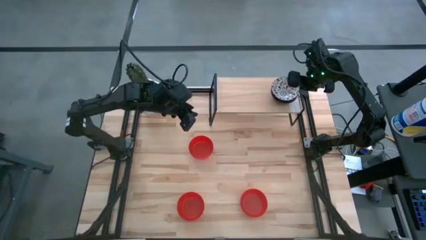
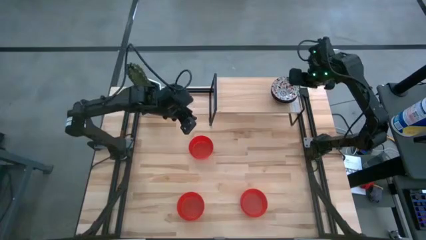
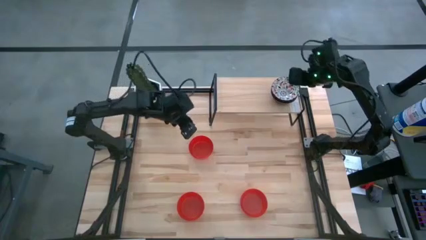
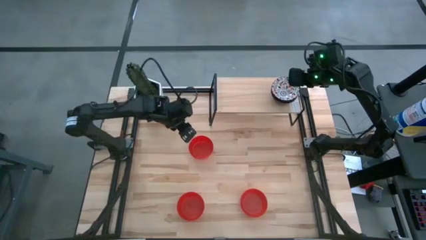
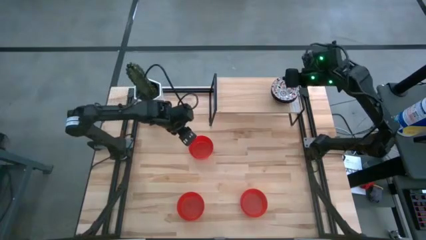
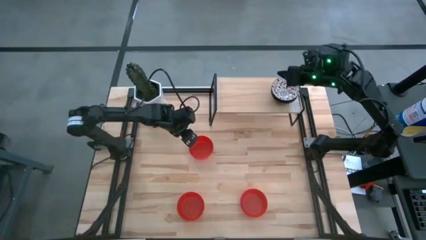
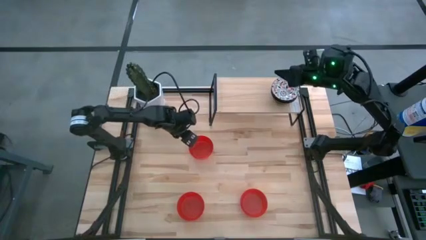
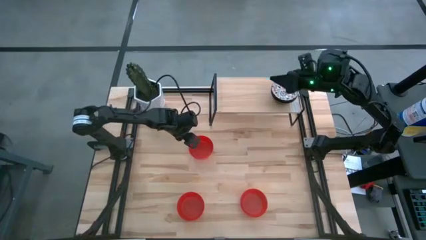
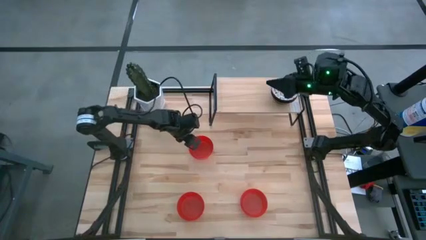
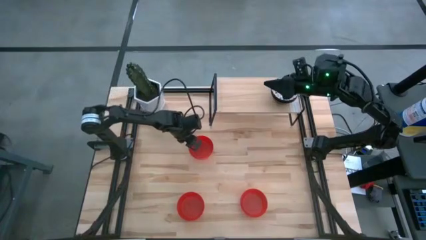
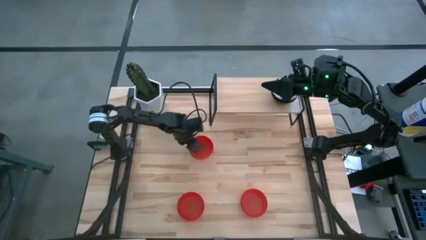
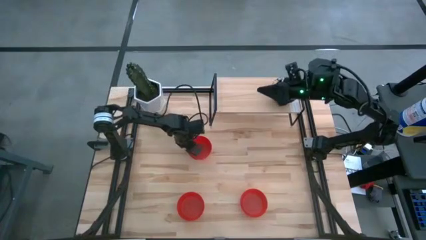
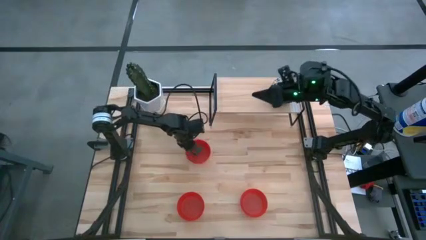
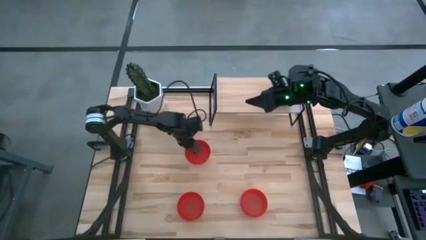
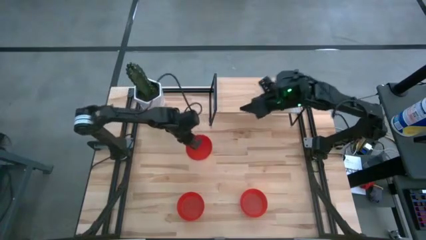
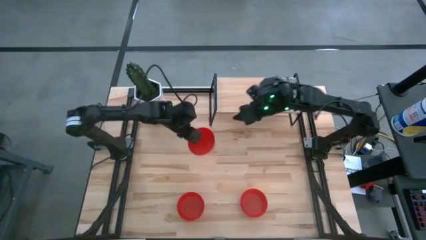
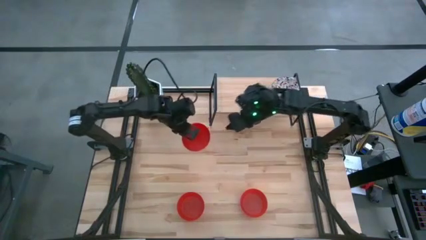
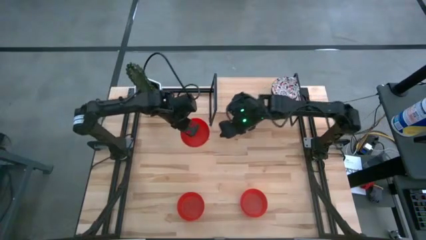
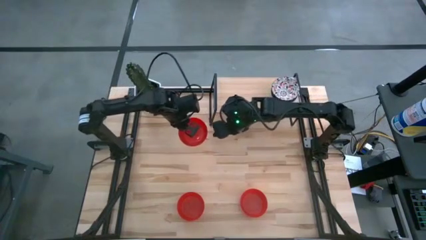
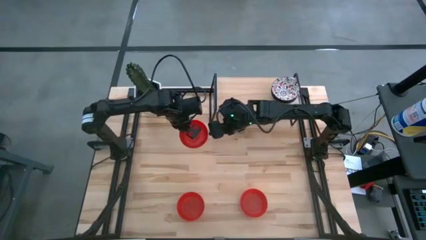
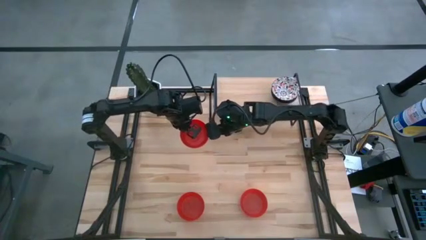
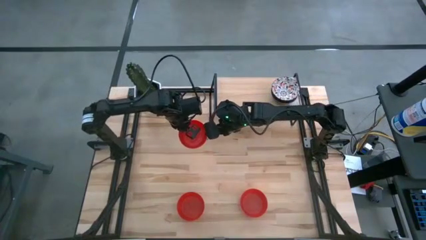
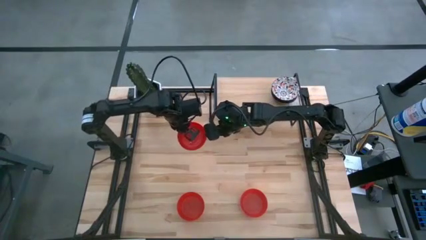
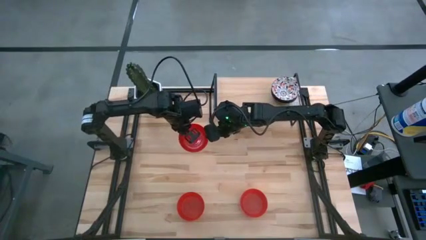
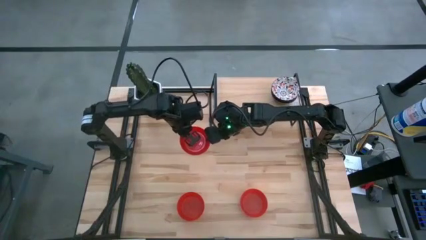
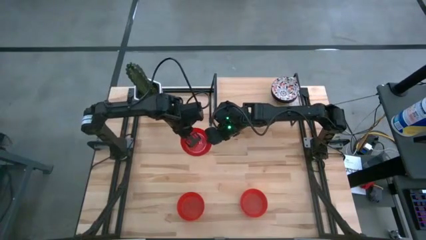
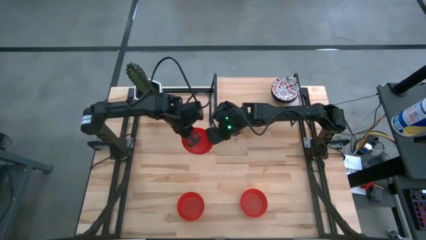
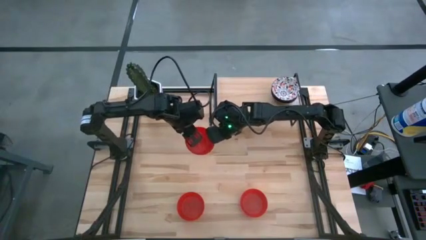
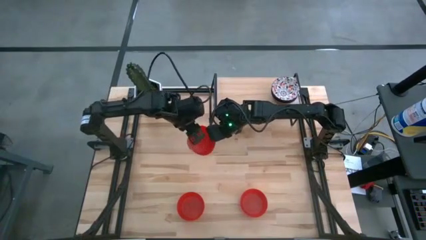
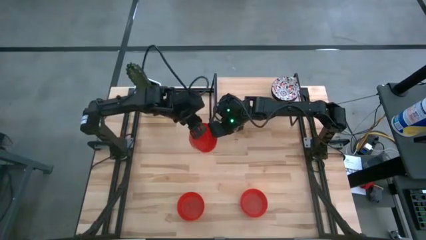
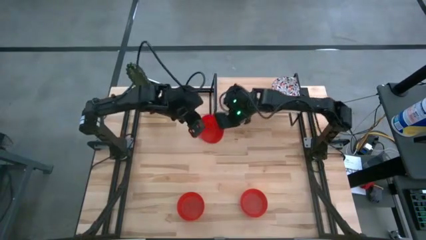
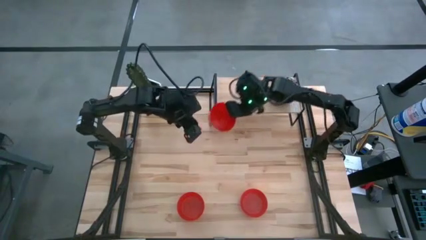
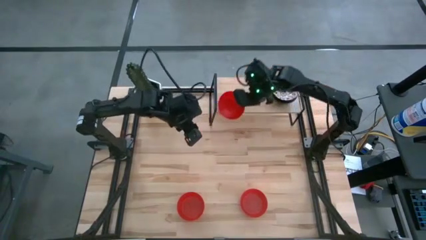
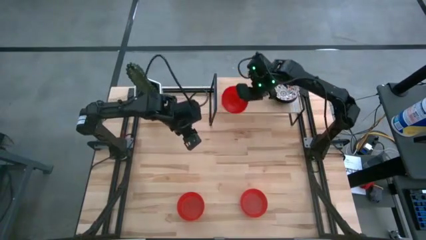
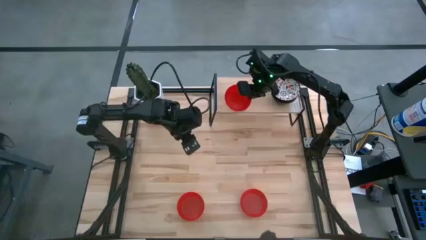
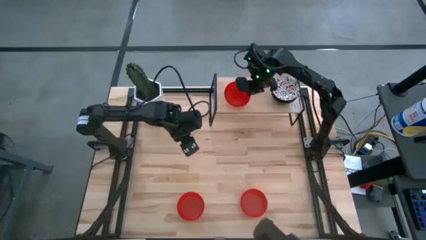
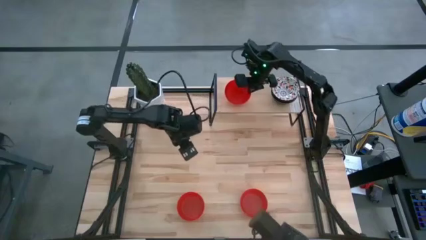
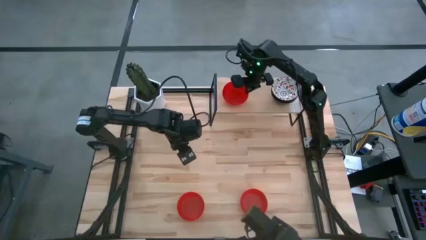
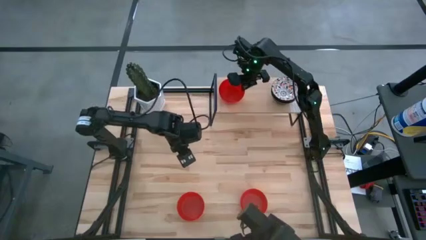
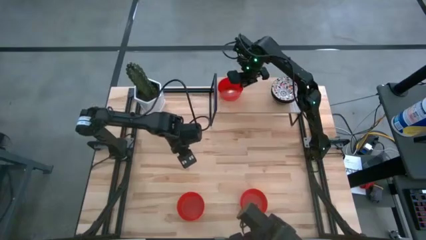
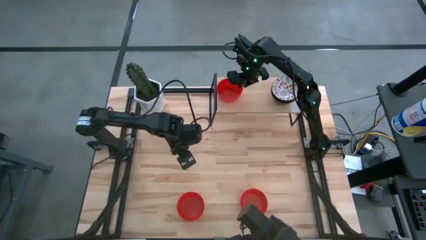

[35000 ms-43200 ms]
Task: Pick & Place Mini bowls
Put the top red bowl on the shelf

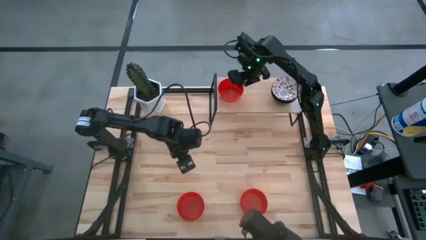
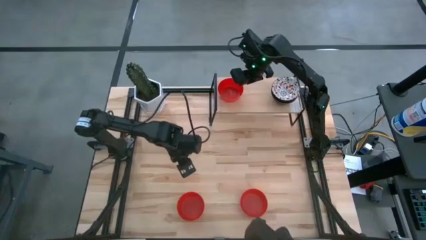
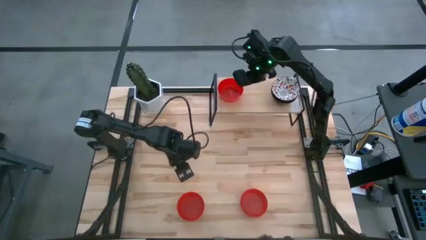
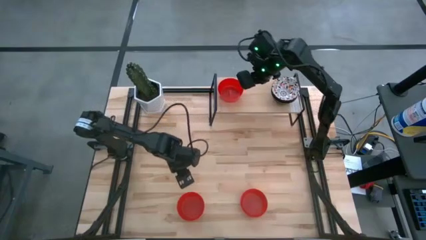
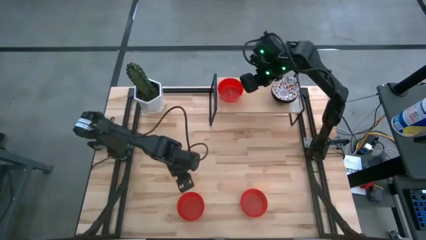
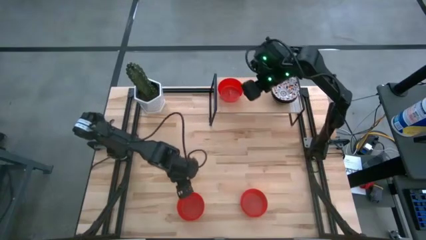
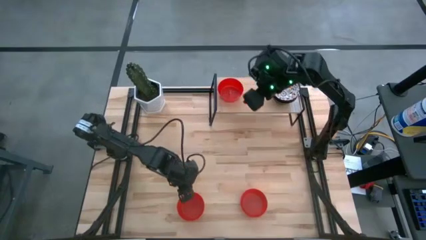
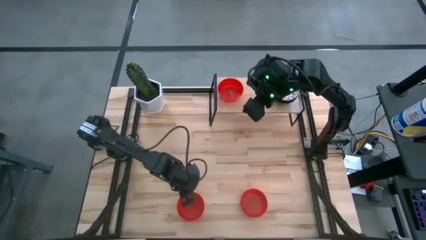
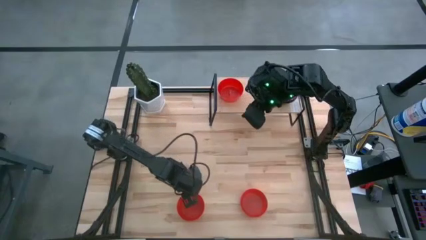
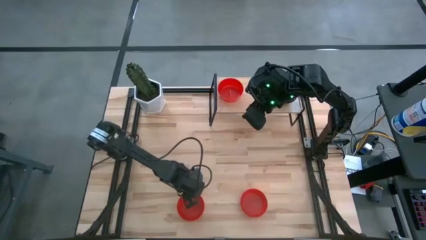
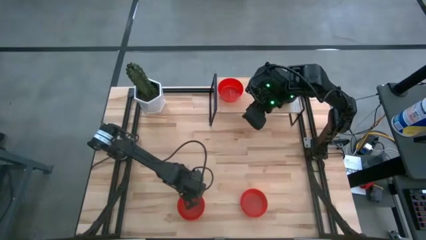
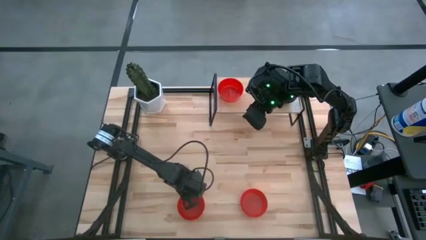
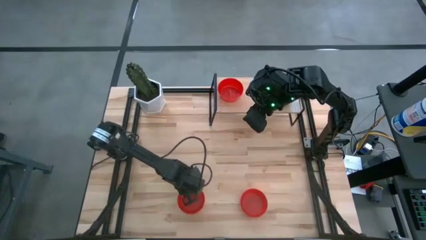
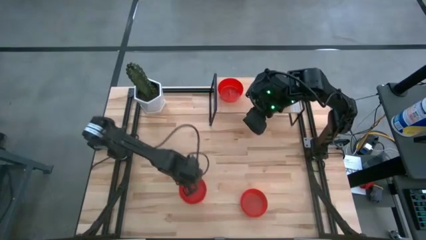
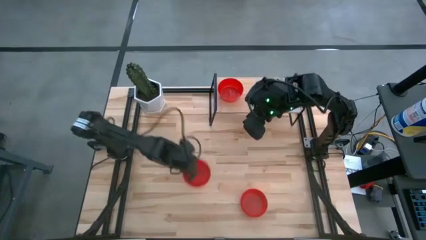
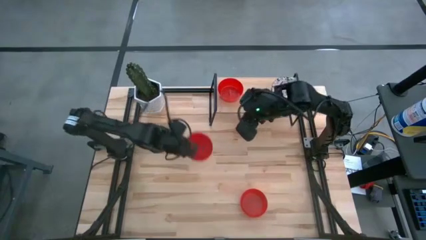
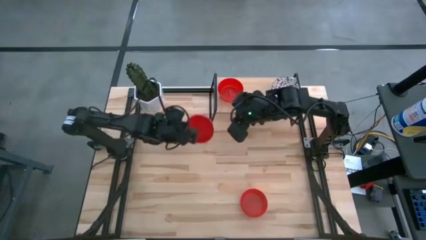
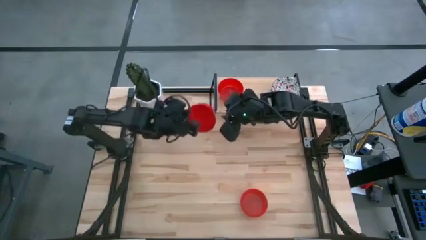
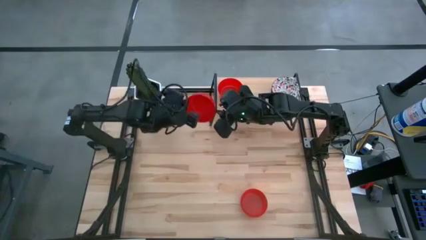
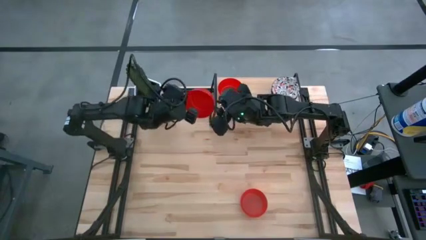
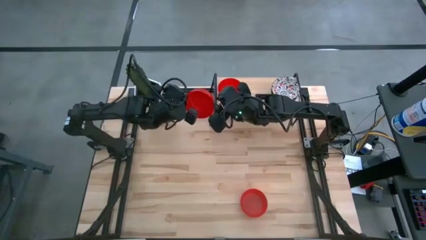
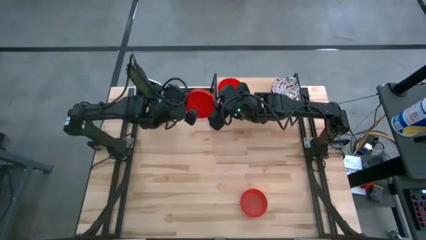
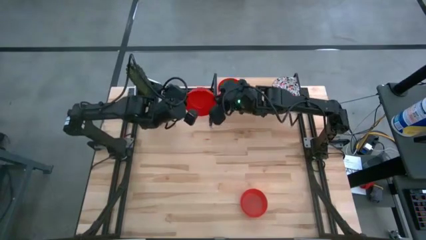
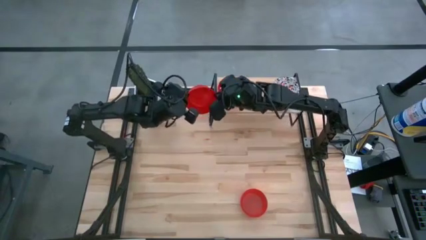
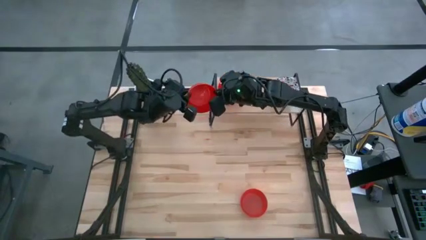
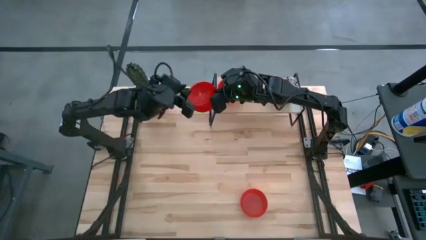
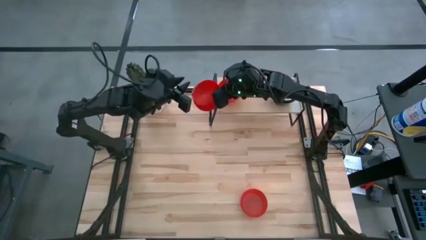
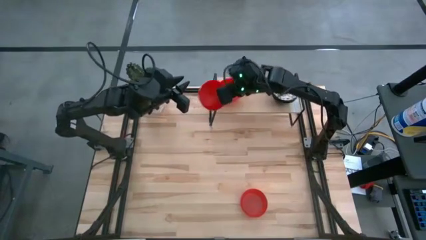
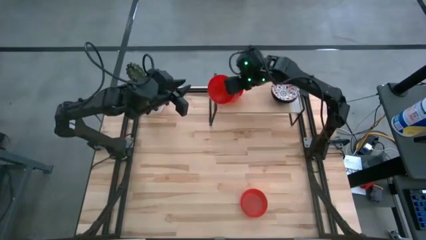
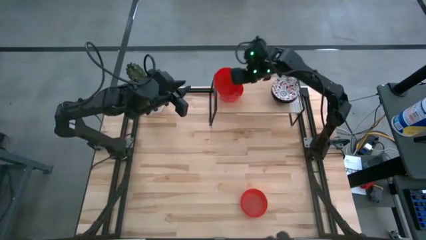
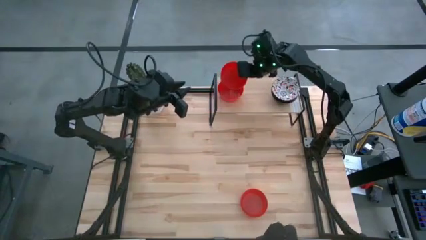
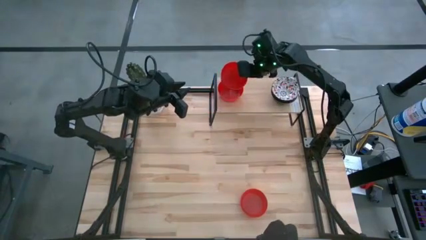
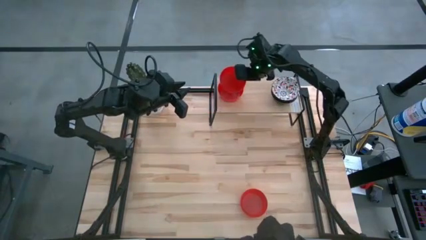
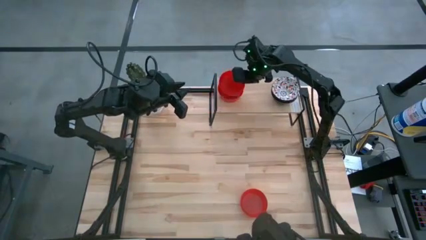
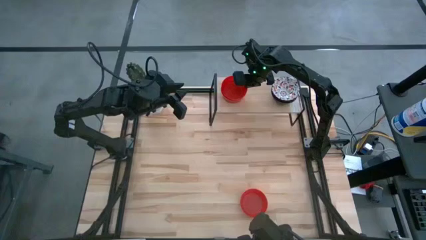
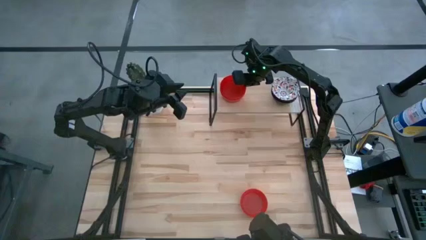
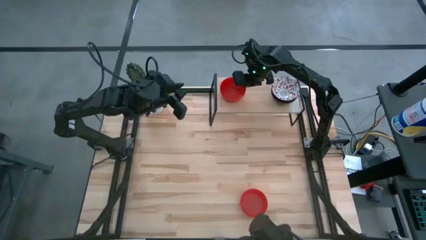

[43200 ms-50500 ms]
Stack the left red bowl on the red bowl on the shelf
